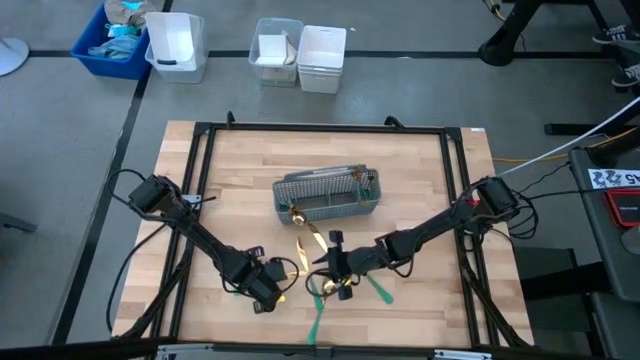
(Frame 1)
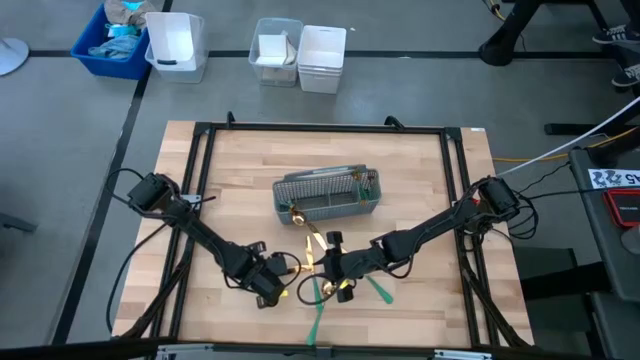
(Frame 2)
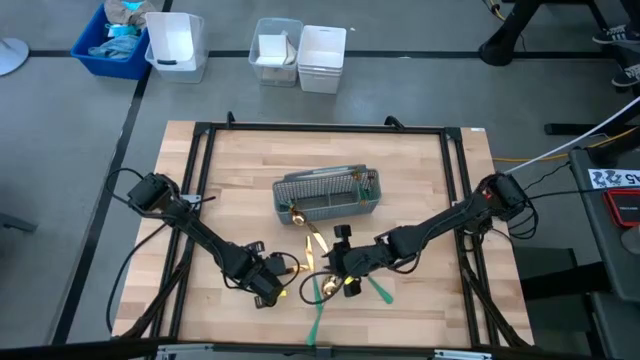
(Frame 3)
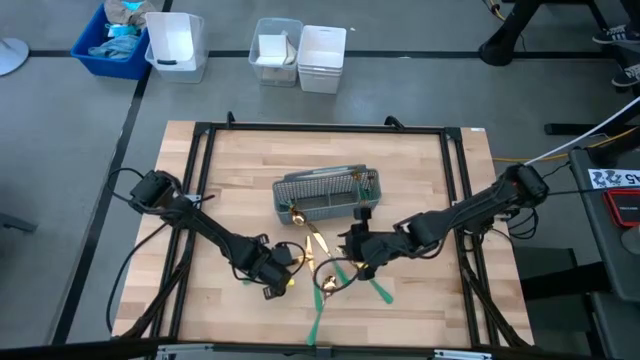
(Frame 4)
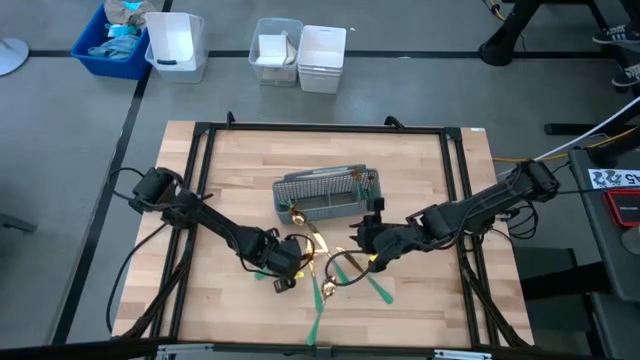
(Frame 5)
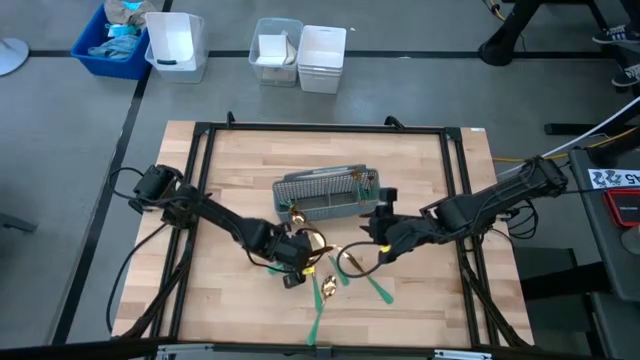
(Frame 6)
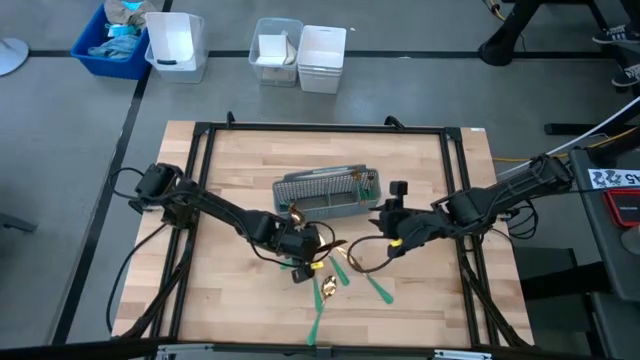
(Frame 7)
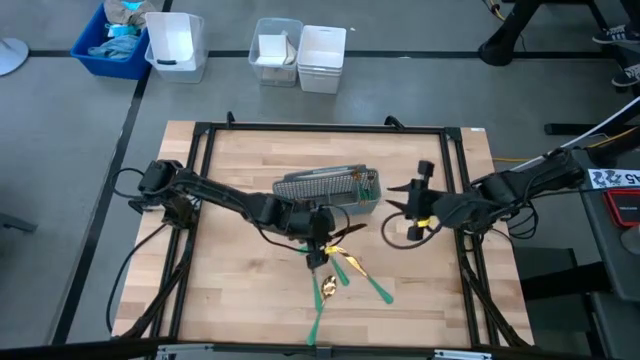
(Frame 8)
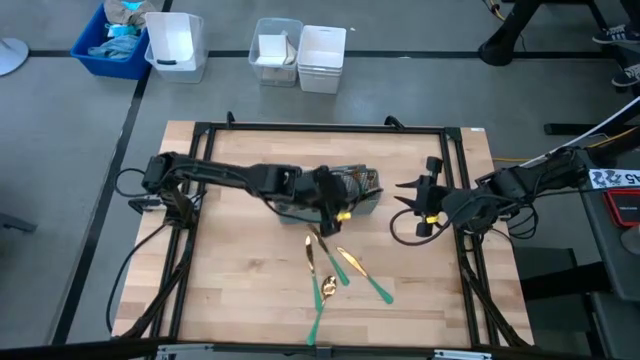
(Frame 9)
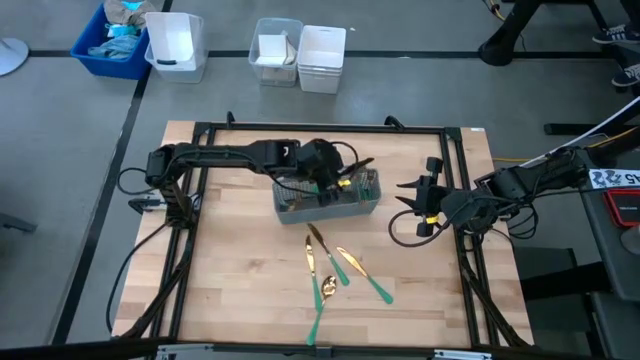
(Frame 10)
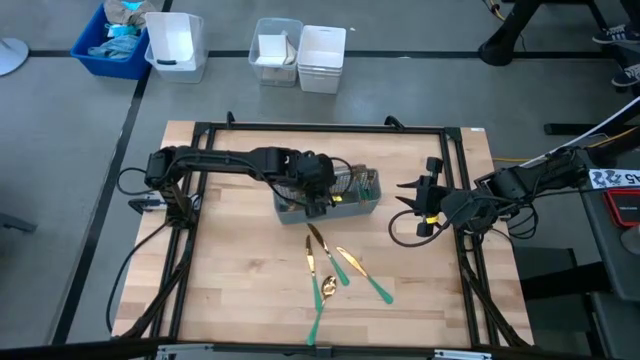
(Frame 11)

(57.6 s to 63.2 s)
Task: Sort silverware
Put the green knife in the gray silverware basket

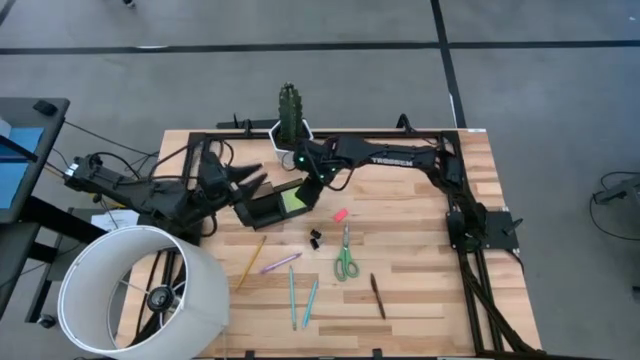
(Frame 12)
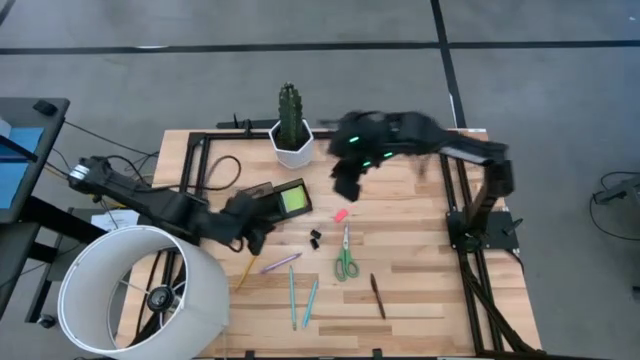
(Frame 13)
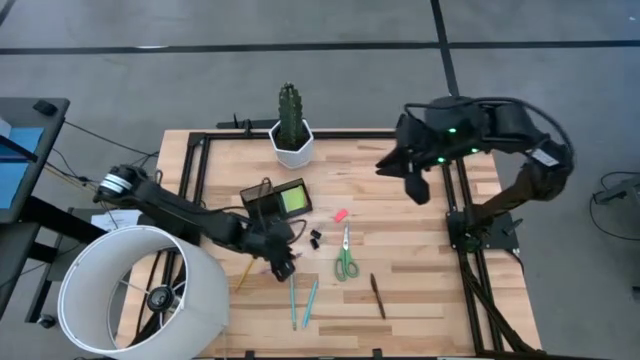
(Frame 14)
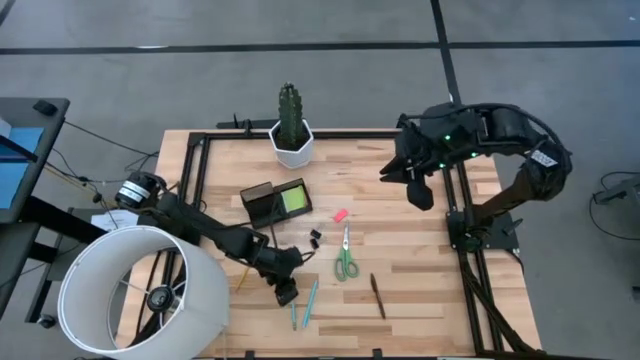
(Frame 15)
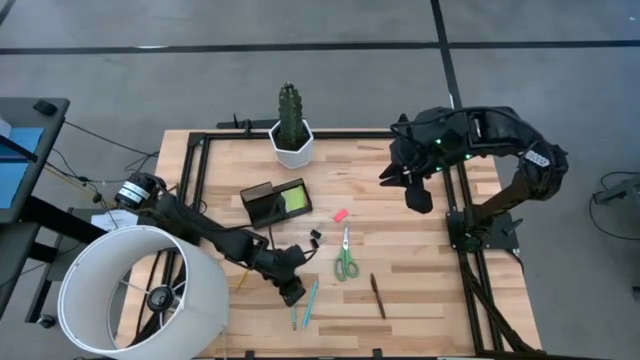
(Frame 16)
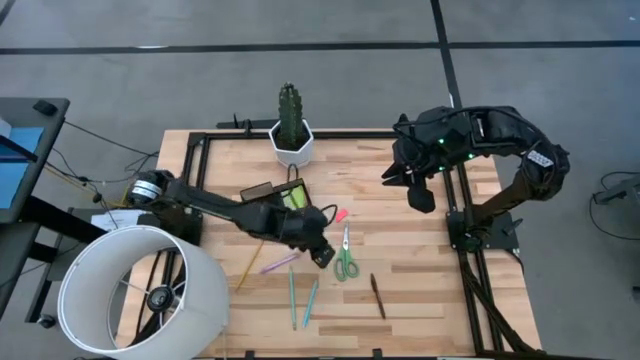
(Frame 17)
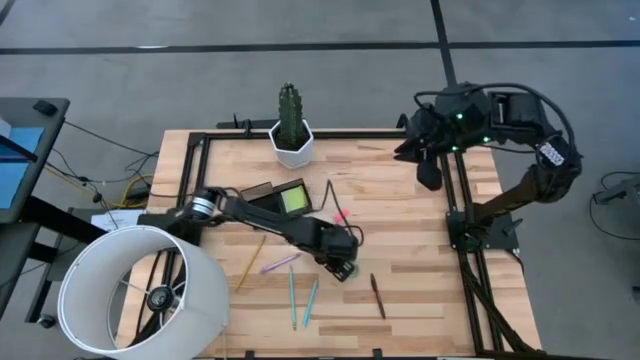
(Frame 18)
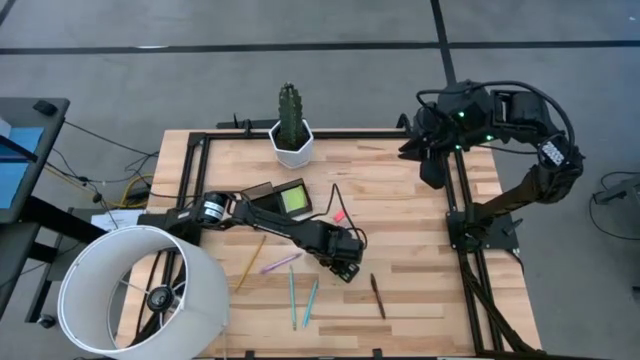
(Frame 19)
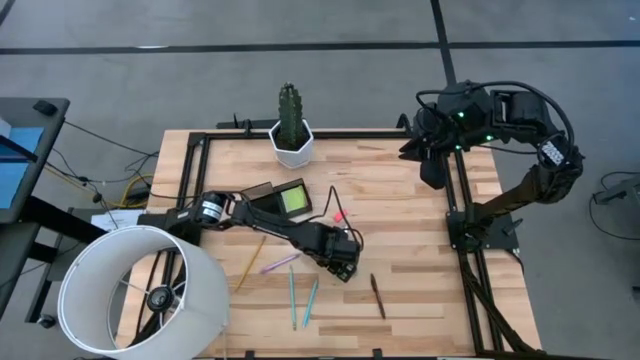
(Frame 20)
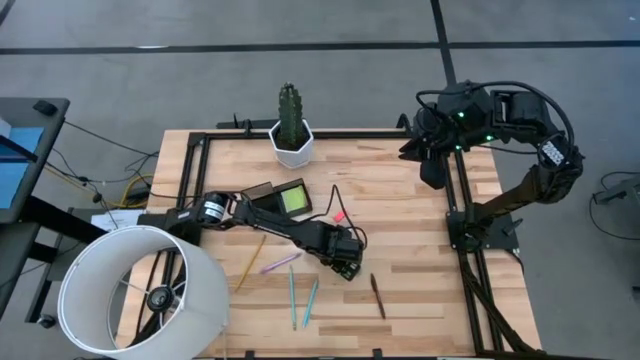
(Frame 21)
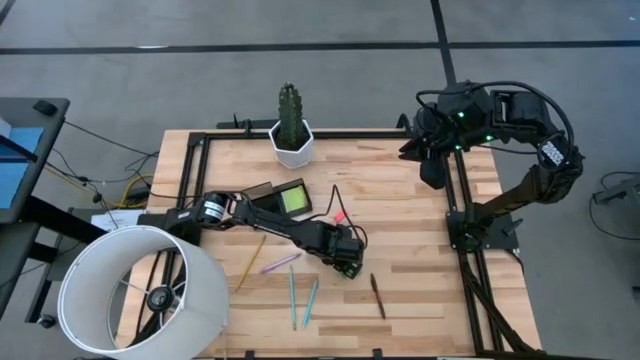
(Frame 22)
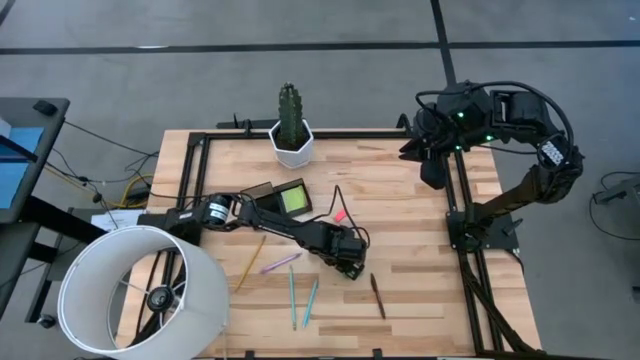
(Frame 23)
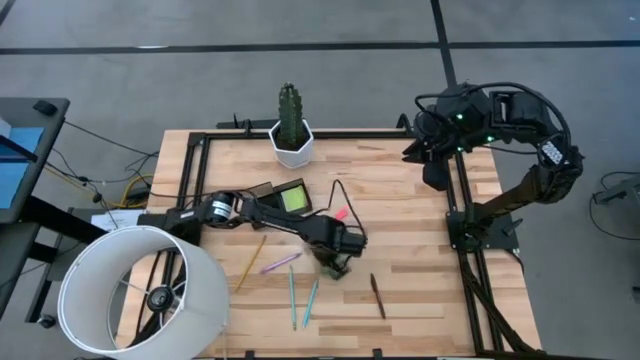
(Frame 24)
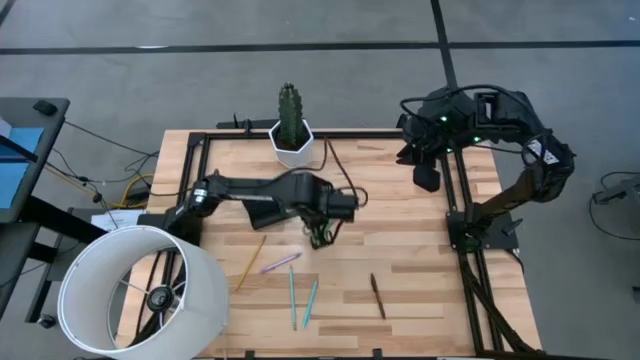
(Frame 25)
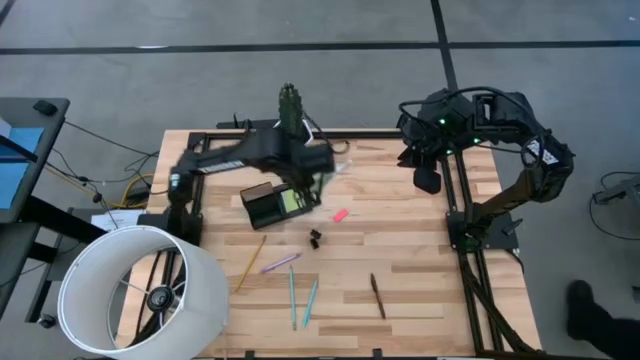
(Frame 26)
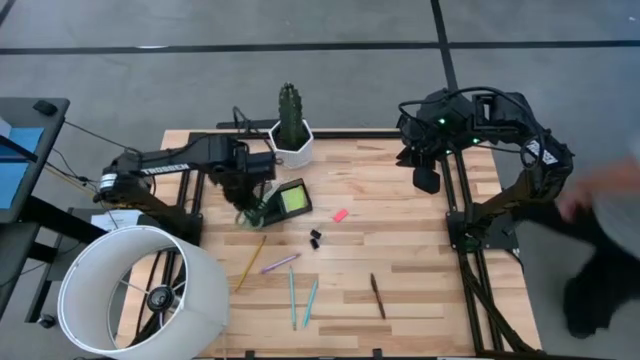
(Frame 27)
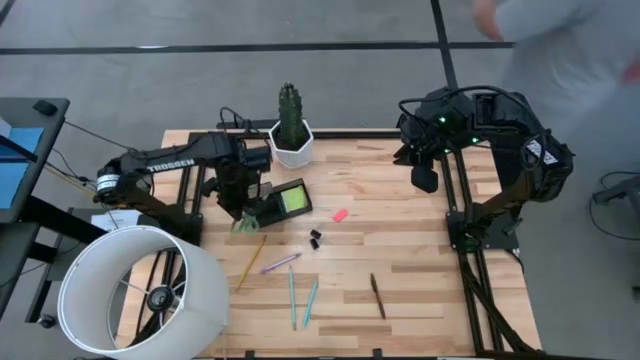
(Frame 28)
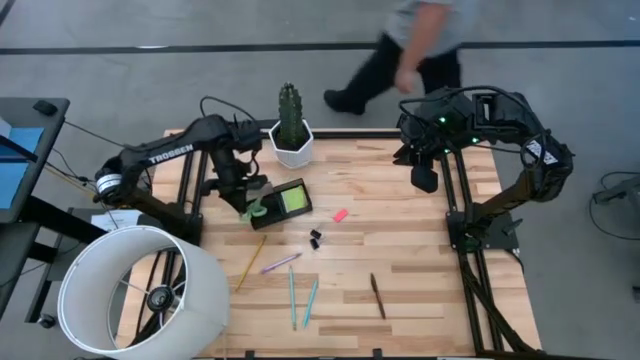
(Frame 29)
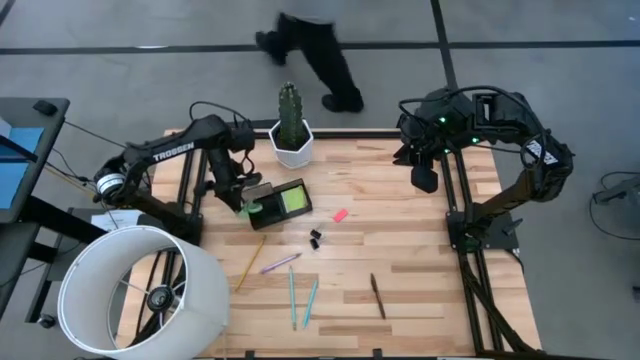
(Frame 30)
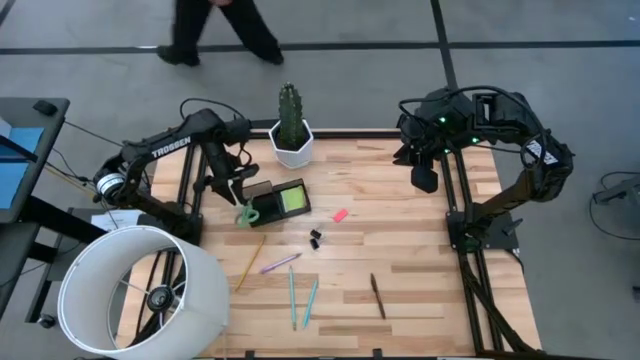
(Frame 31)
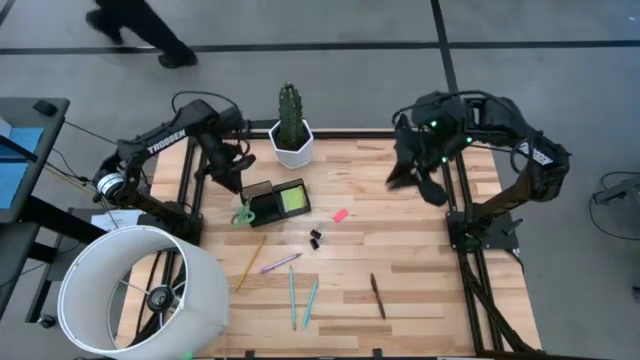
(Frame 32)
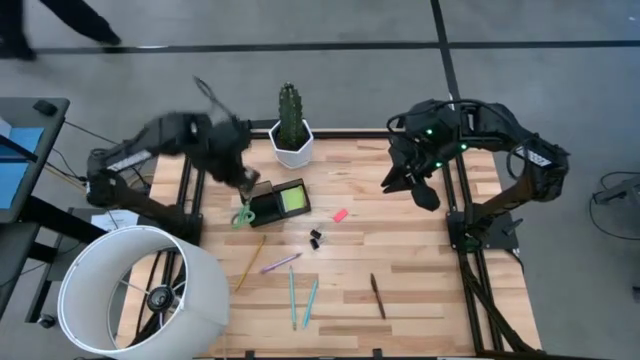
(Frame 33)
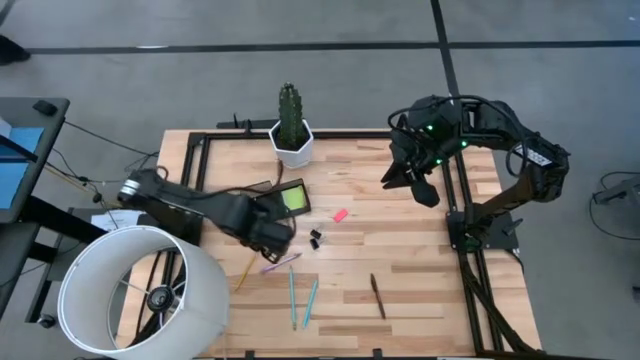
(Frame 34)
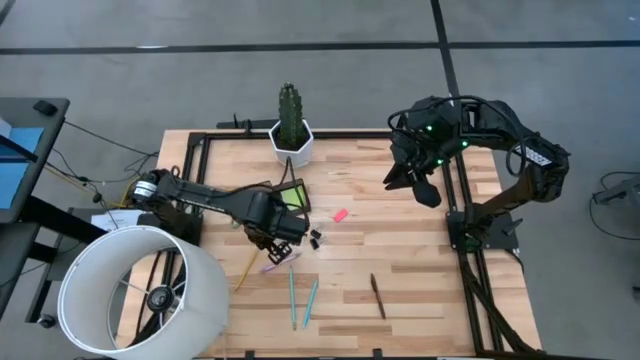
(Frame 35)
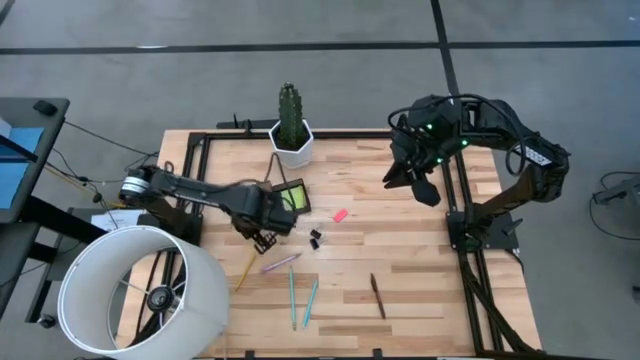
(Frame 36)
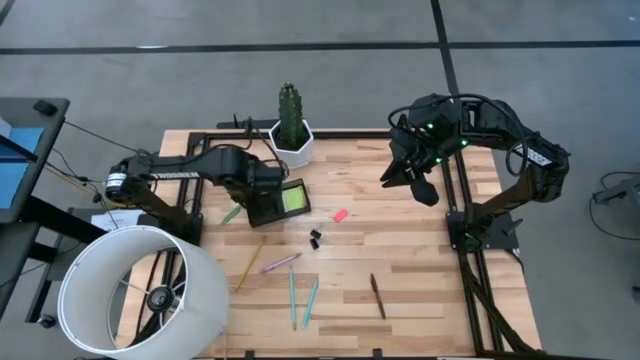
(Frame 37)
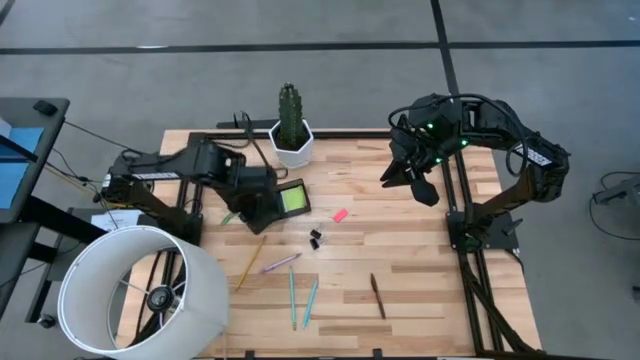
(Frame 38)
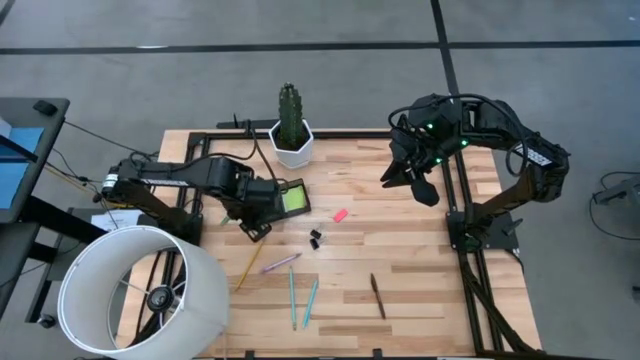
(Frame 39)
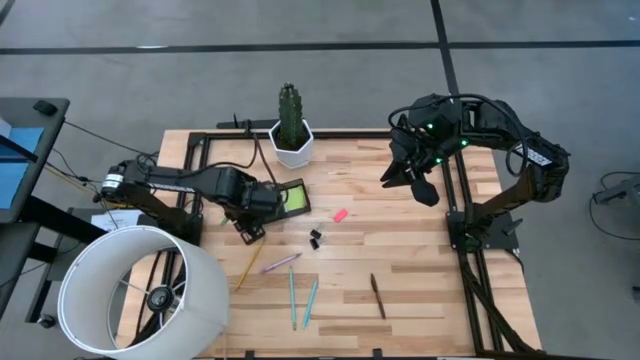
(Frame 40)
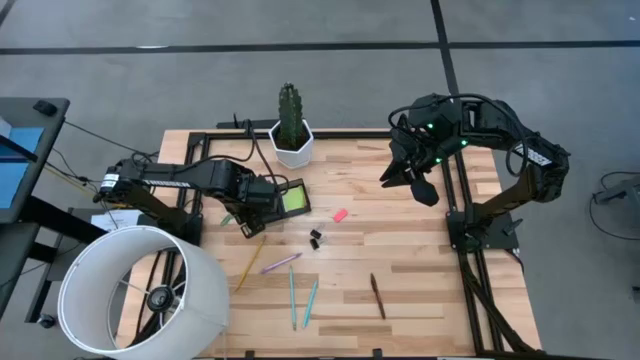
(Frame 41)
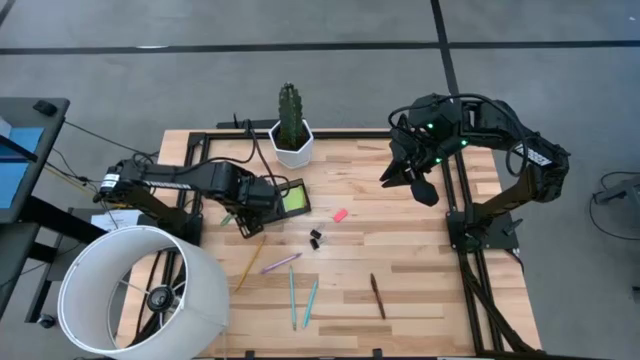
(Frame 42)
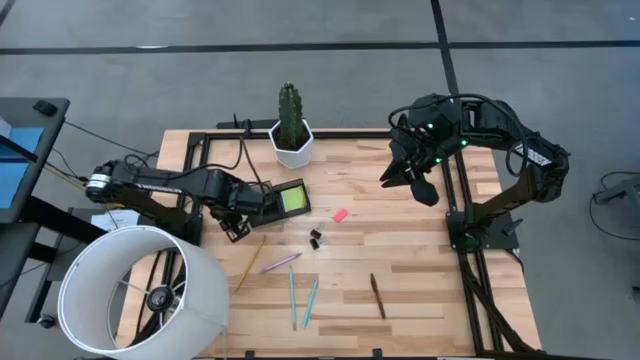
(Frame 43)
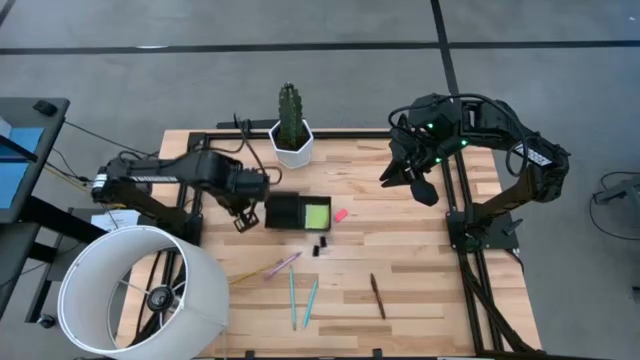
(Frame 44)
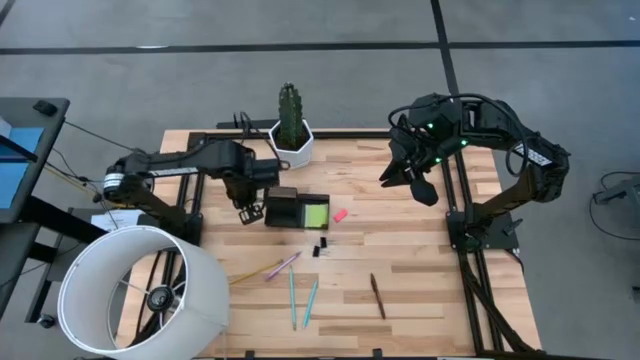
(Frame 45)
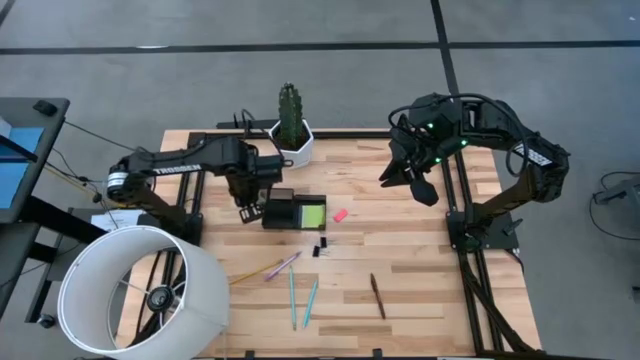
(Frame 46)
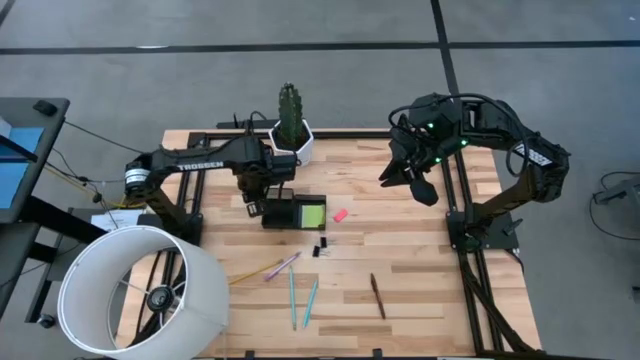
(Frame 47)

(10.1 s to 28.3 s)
Task: Pick and place office supplies into organizer
Put the green scissors into the black mesh organizer
